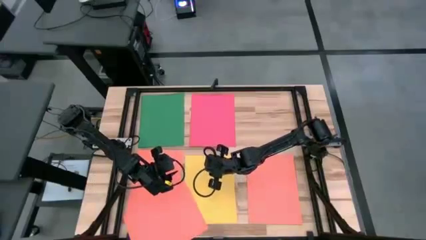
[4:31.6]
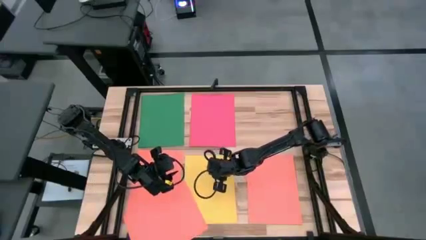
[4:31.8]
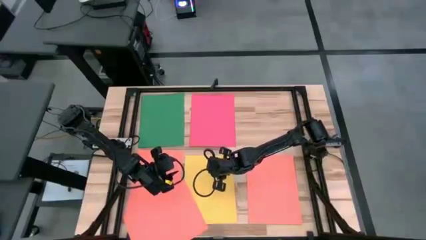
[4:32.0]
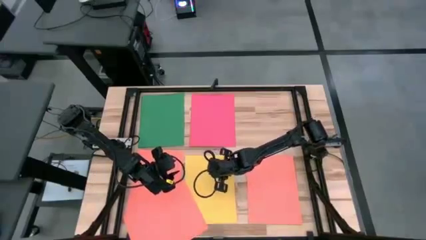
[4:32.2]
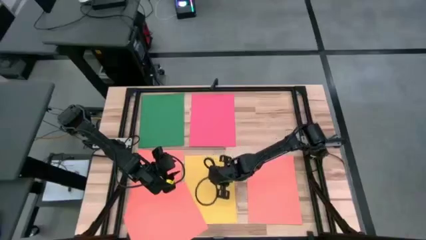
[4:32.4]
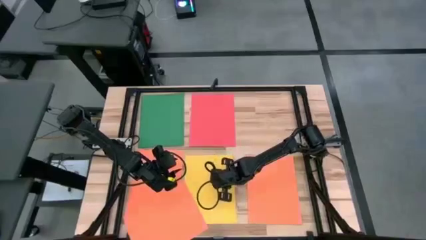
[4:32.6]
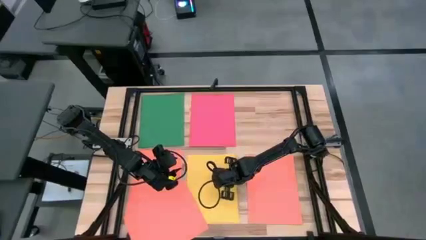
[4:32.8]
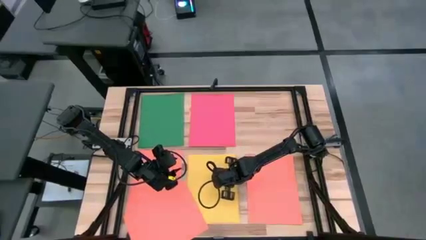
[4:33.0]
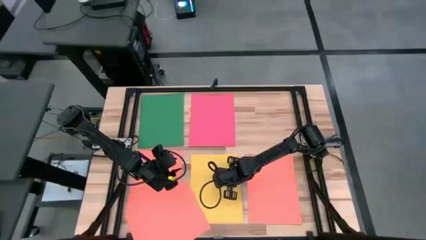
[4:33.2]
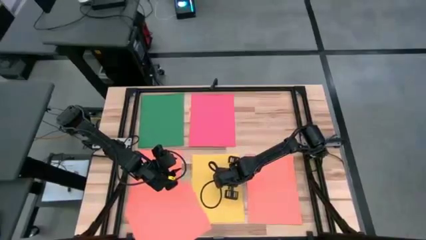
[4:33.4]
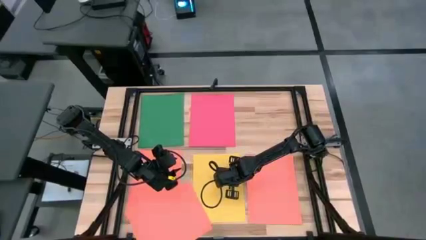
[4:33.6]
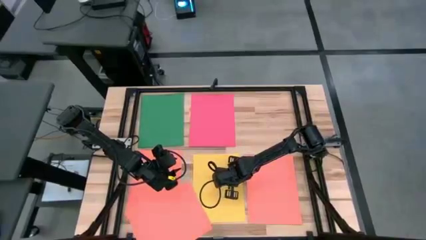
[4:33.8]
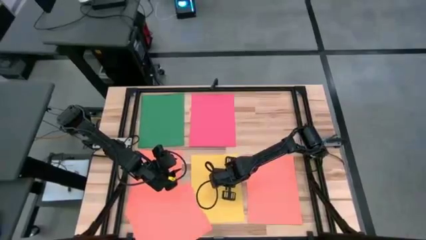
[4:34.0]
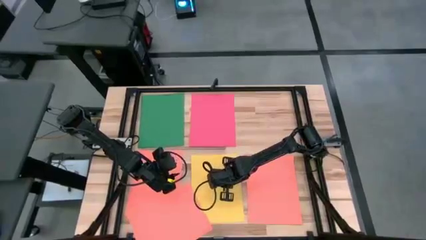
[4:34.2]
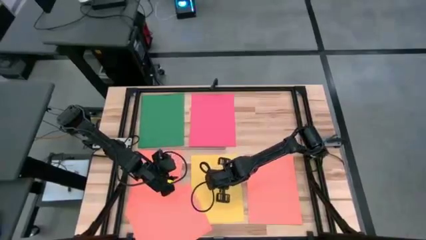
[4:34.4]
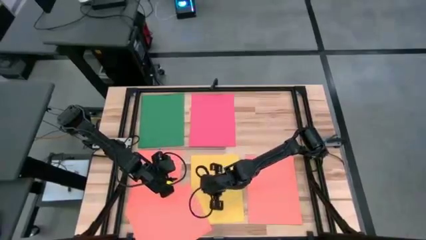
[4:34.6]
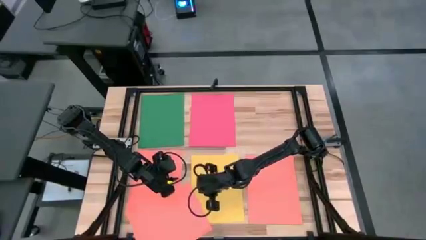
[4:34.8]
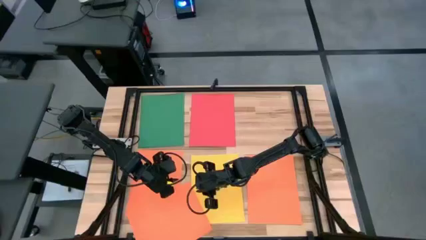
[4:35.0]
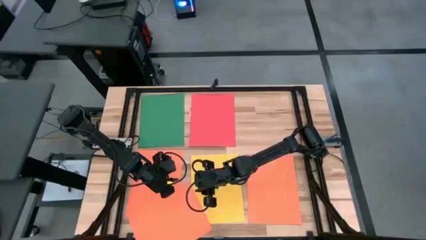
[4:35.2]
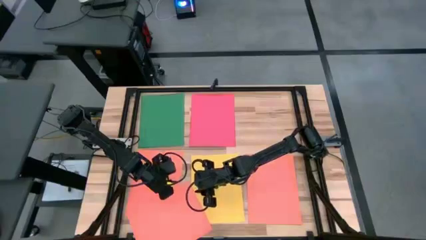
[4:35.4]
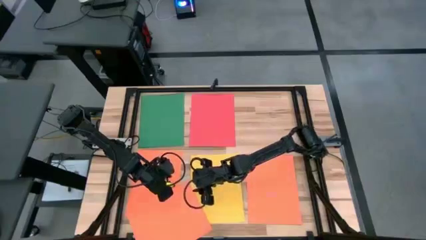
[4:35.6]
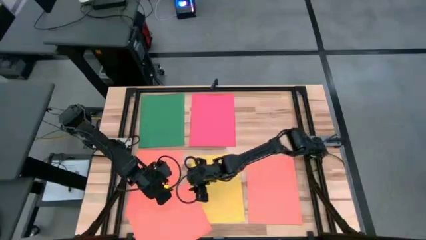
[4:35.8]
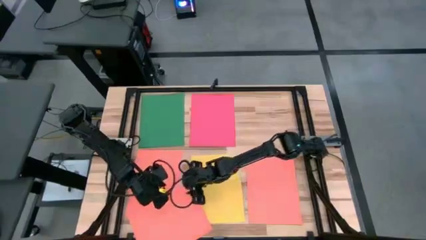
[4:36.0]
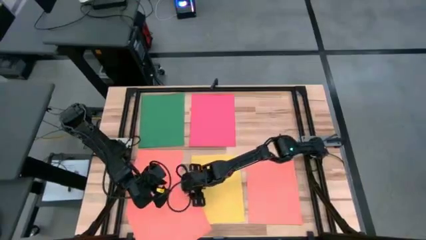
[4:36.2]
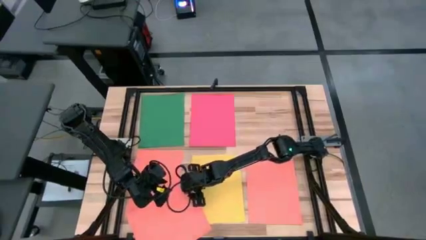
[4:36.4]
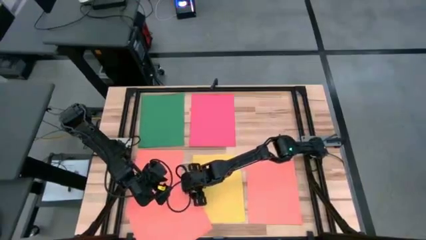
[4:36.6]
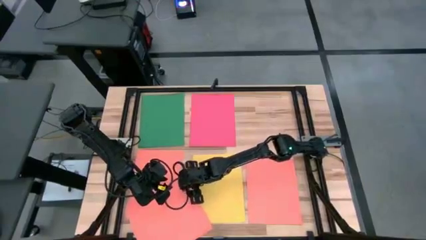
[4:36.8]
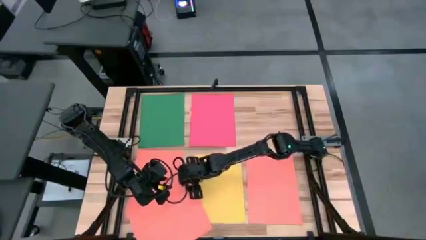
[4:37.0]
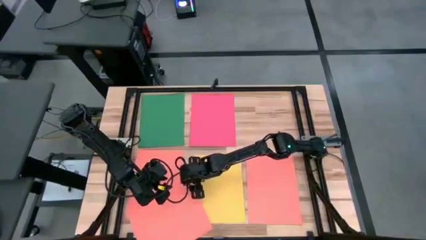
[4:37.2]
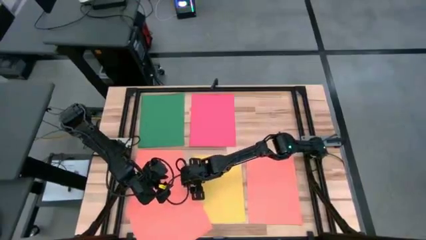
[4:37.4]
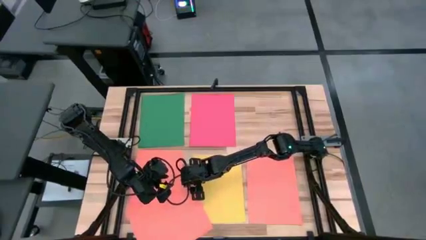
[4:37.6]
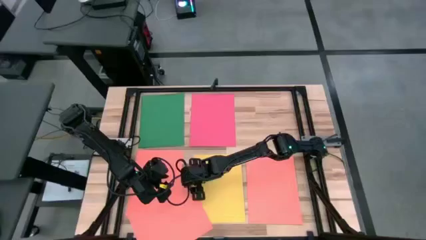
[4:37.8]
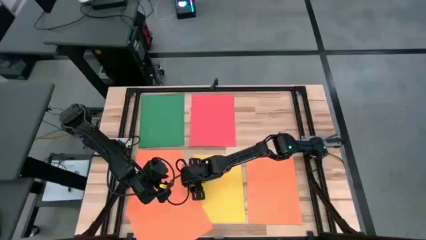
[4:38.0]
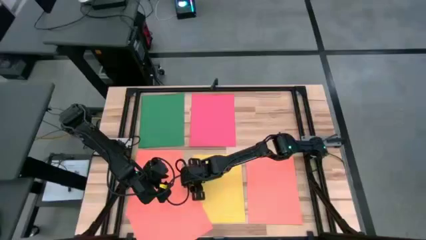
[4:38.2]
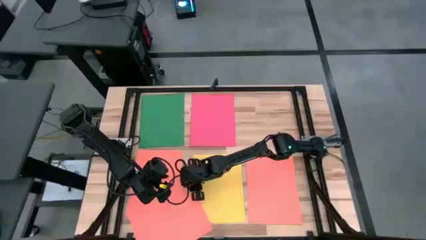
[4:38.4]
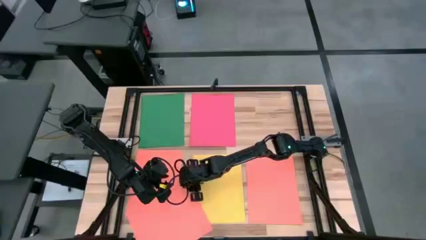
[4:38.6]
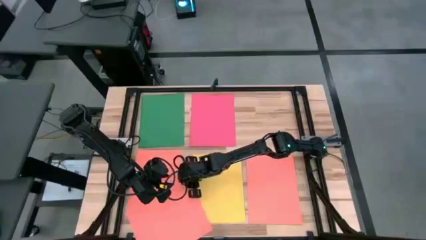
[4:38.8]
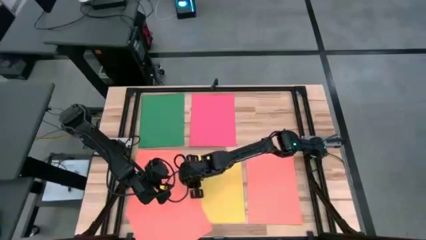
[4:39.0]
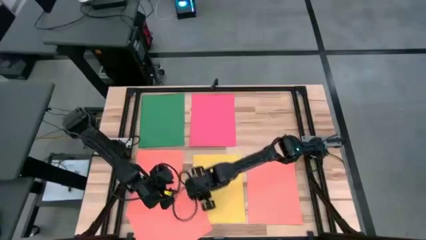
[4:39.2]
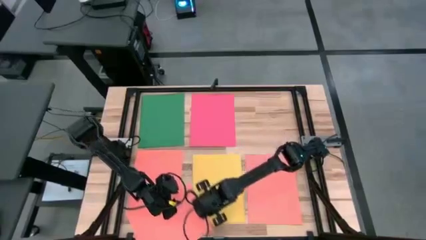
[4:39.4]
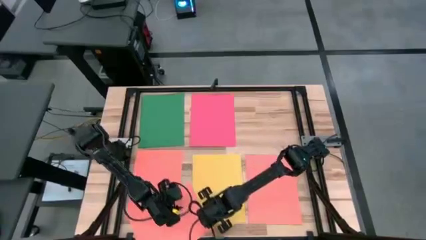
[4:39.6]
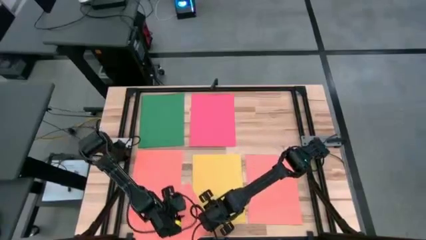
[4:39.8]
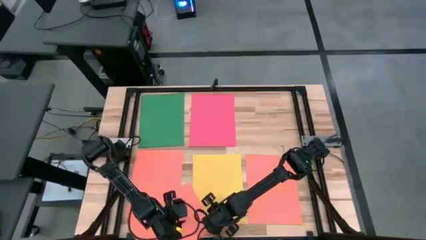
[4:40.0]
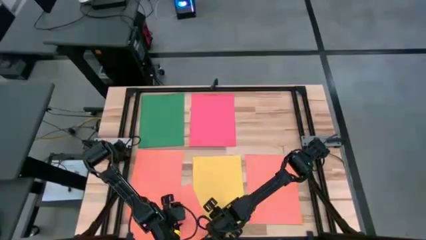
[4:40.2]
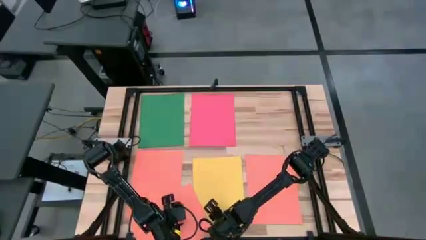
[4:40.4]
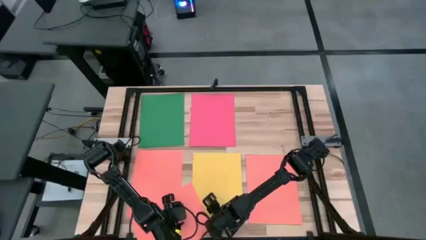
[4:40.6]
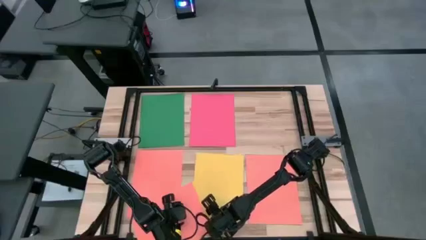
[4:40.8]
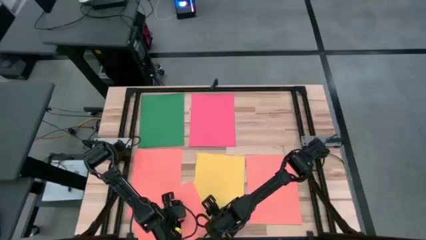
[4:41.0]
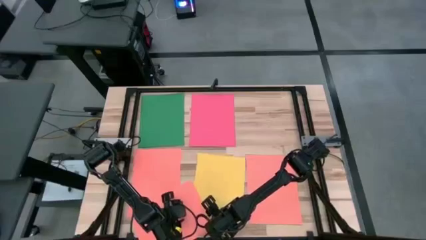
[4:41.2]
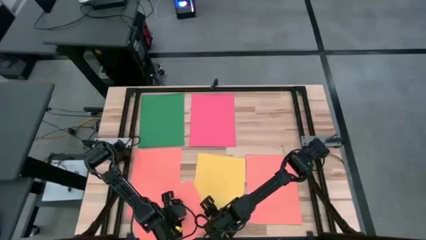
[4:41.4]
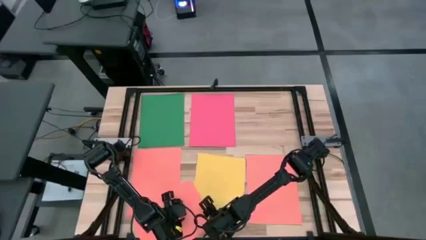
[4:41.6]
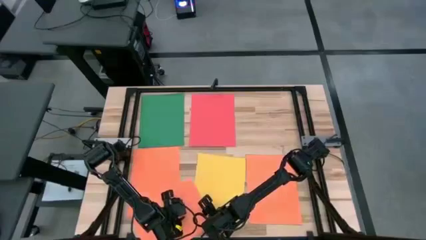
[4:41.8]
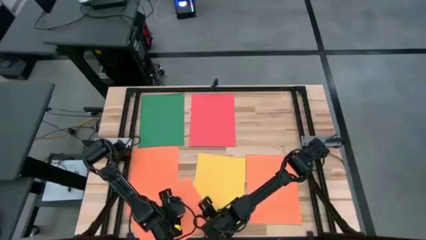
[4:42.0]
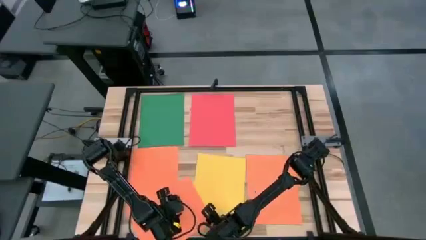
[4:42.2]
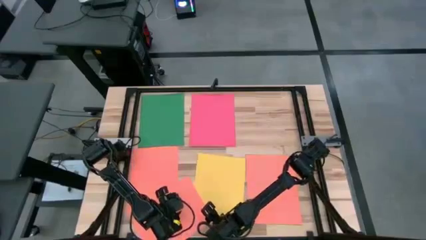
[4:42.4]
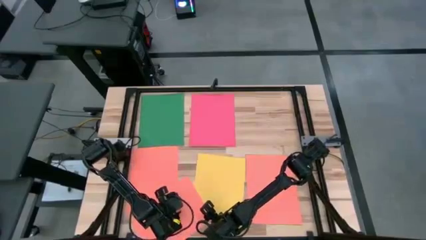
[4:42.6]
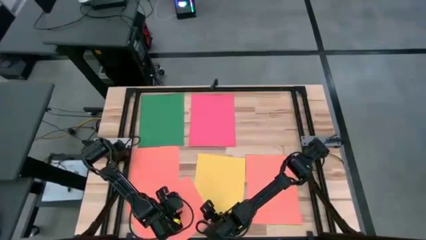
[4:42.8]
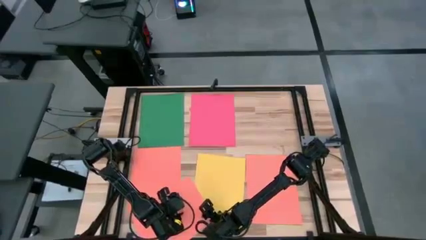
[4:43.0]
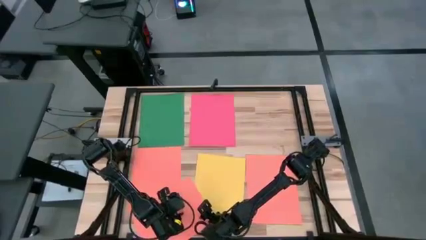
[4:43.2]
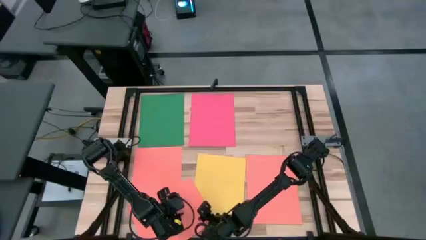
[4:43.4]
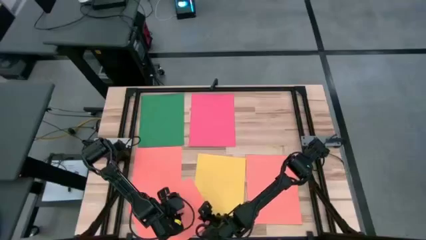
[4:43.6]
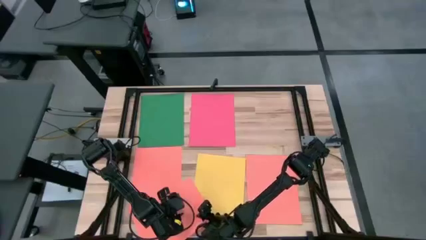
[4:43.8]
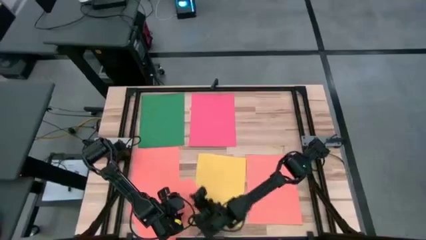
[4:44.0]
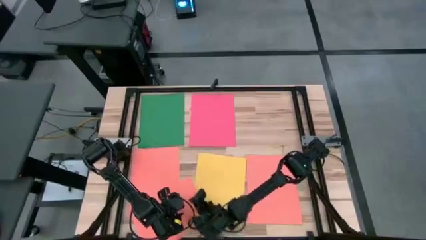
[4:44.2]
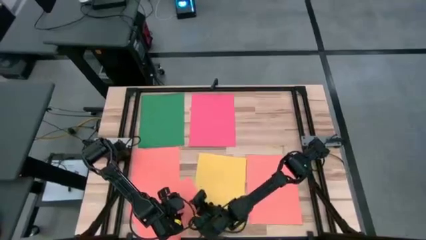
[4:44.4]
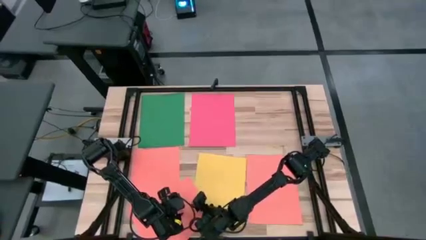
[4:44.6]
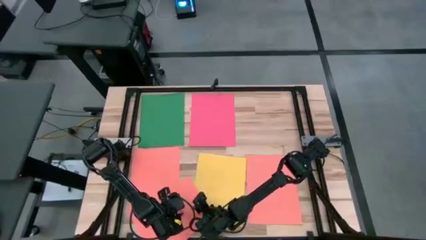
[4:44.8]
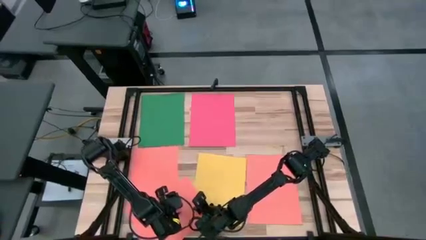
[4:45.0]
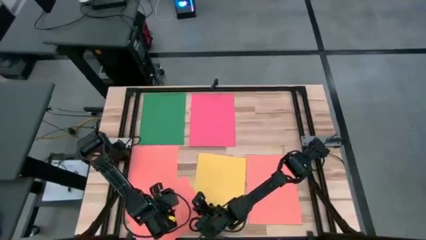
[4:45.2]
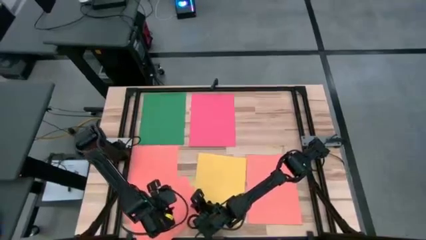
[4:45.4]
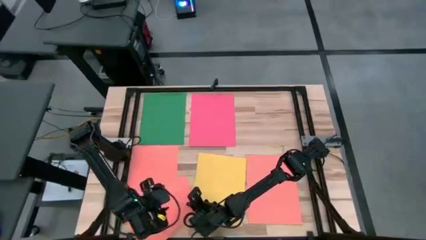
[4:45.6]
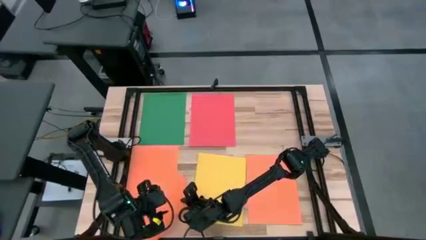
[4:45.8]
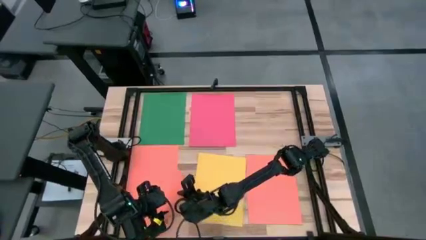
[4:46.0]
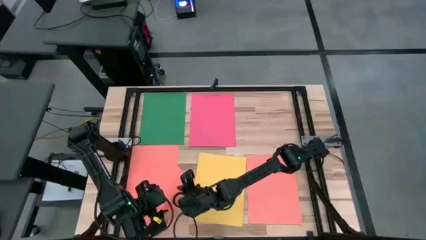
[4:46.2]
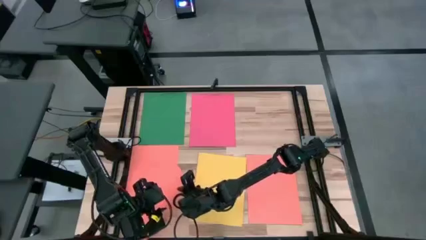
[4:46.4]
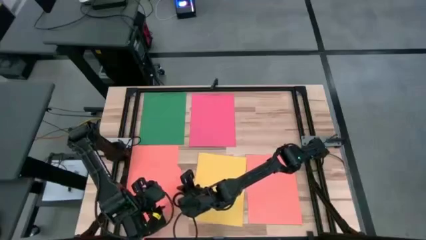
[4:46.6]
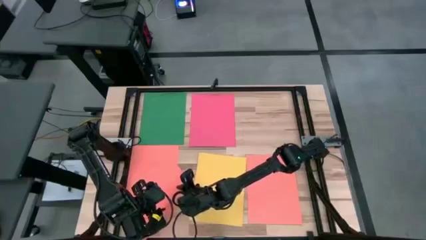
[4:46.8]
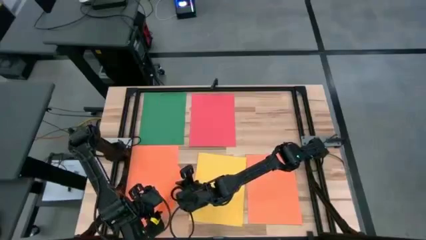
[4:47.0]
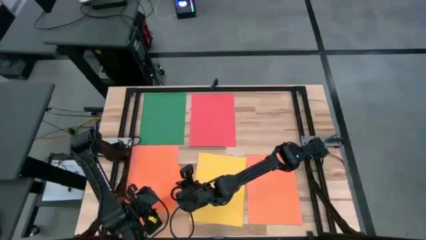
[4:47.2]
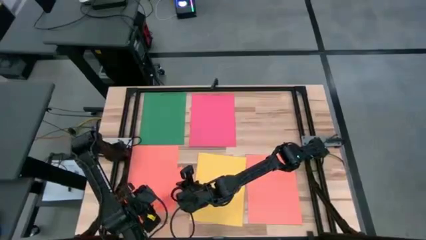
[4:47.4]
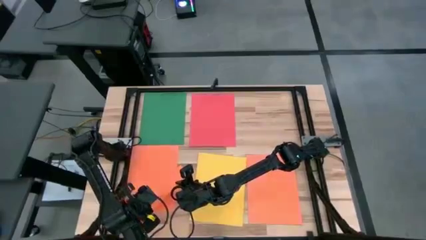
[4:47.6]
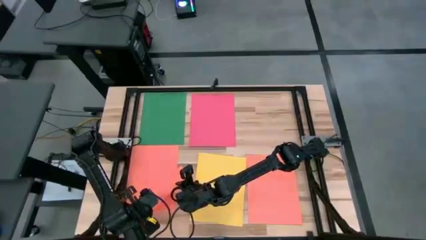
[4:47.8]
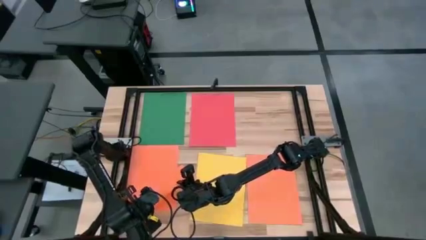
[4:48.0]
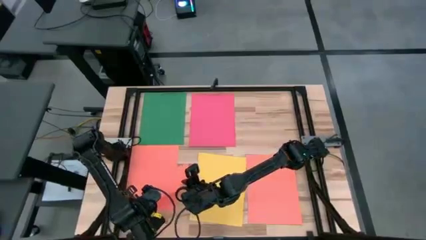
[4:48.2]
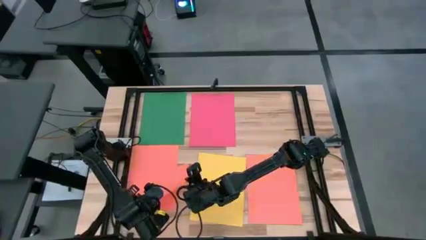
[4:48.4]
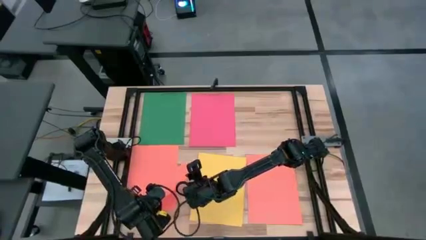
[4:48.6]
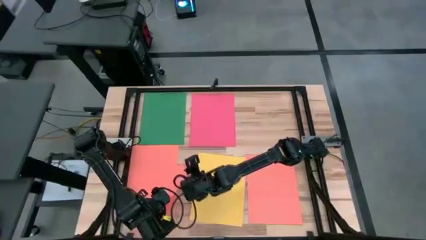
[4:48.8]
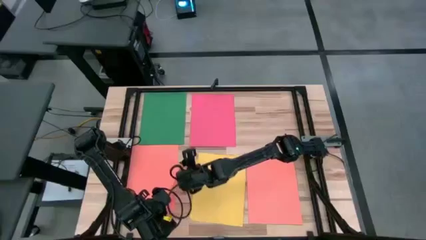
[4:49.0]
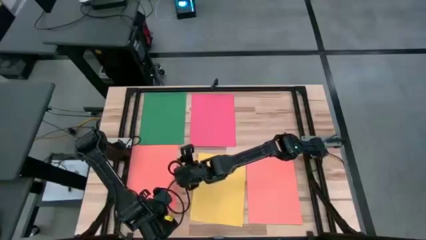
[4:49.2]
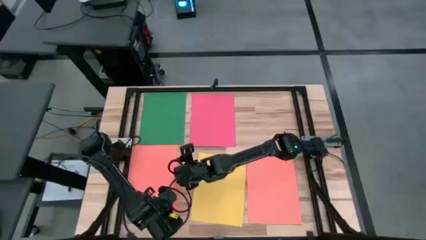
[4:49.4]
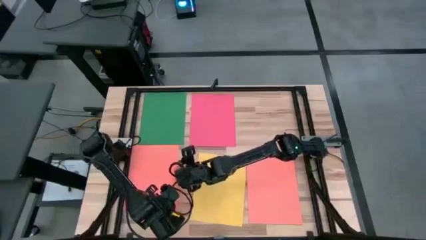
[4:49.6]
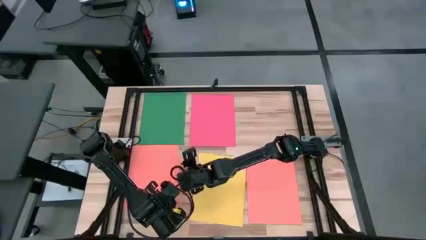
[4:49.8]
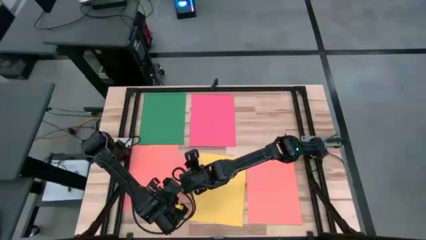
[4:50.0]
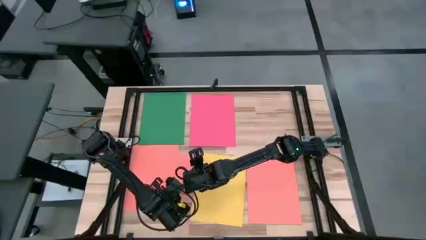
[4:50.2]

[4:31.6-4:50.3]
Task: Organize paper
Stack the orange paper on top of the orange paper
